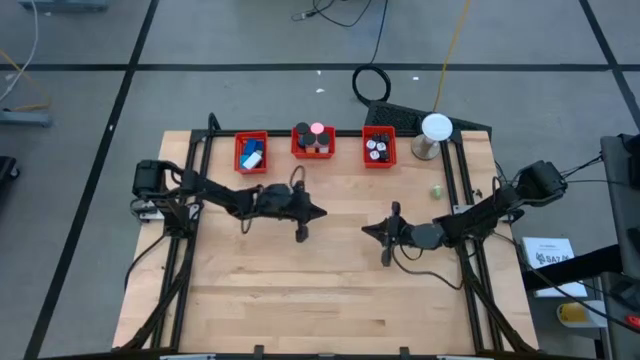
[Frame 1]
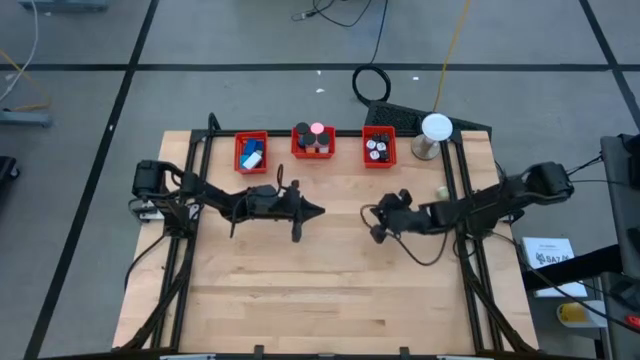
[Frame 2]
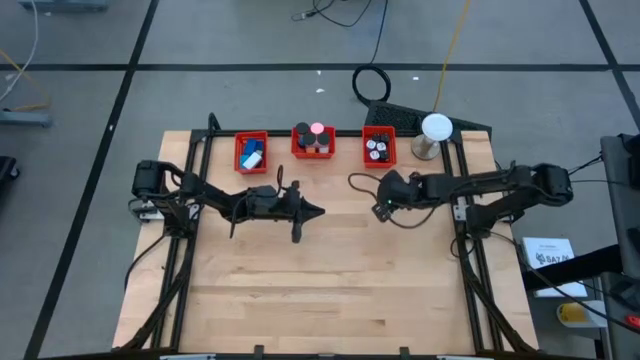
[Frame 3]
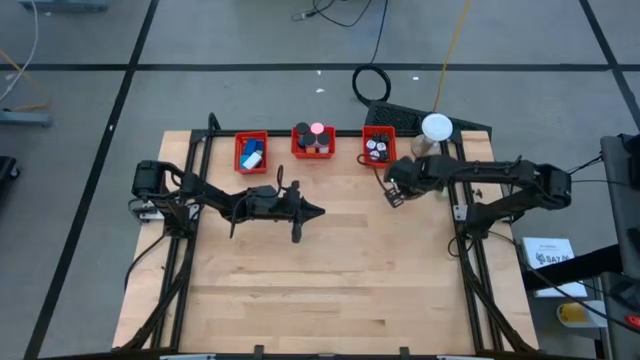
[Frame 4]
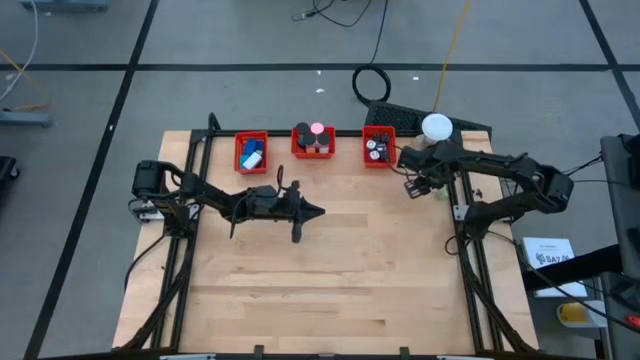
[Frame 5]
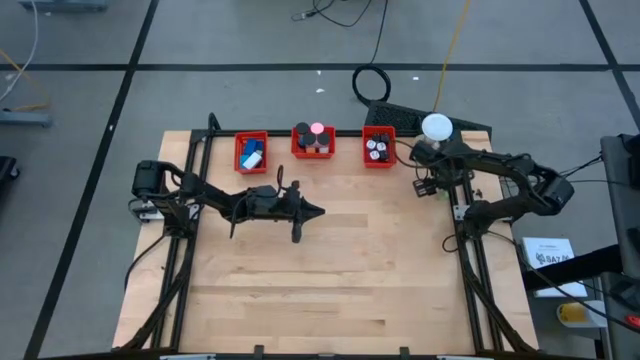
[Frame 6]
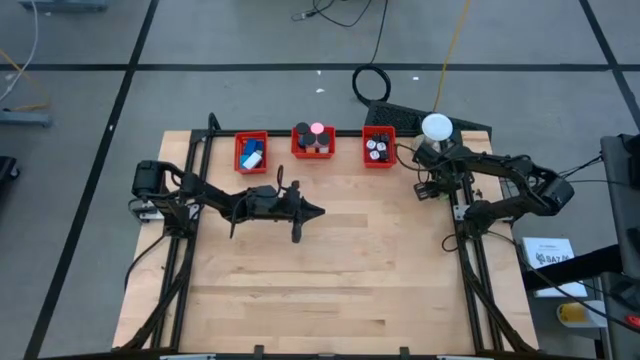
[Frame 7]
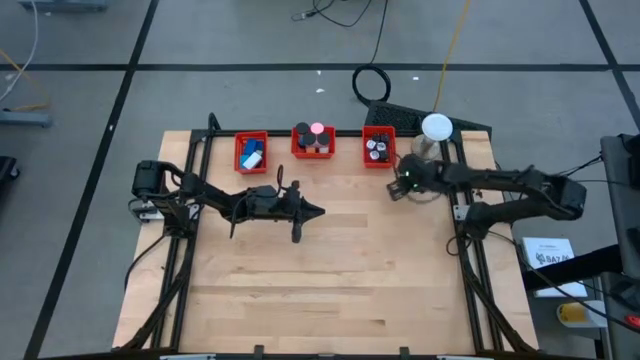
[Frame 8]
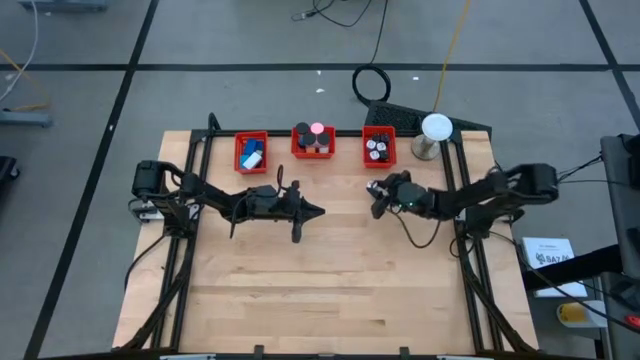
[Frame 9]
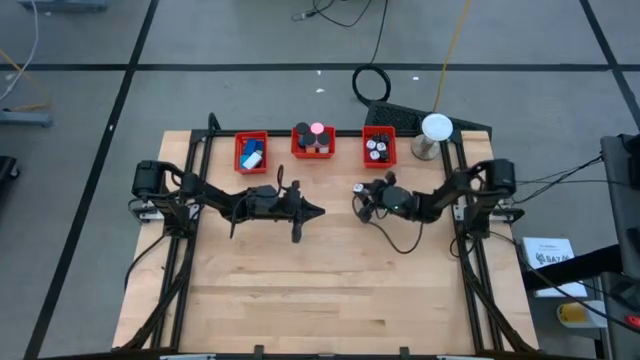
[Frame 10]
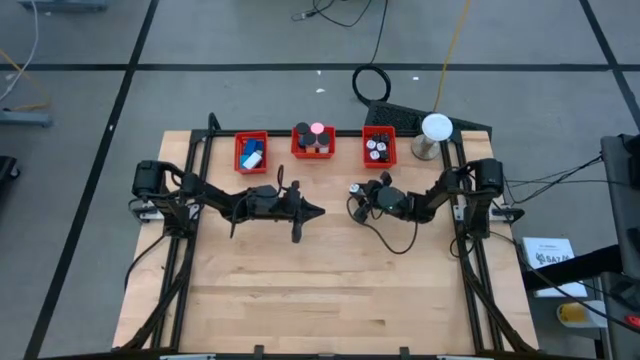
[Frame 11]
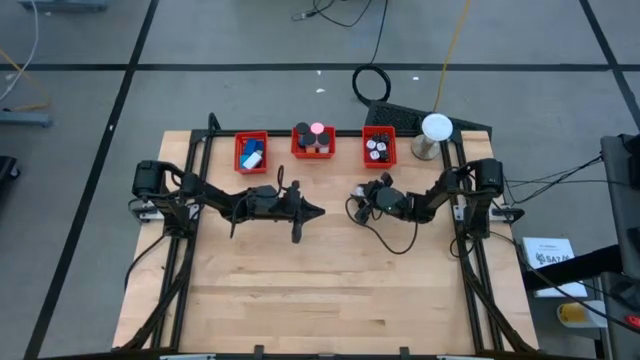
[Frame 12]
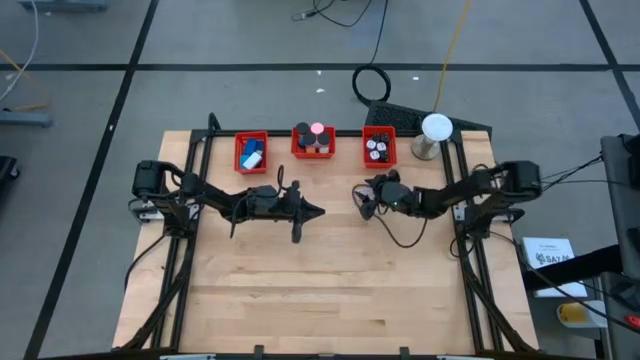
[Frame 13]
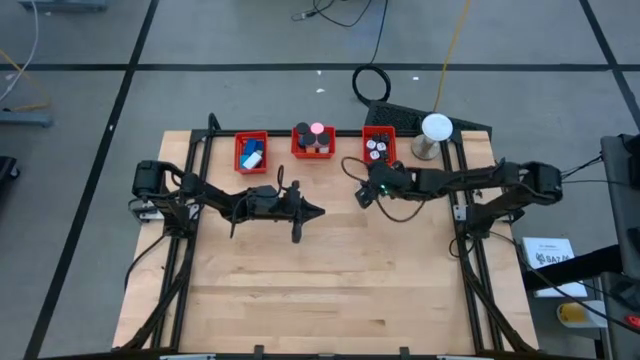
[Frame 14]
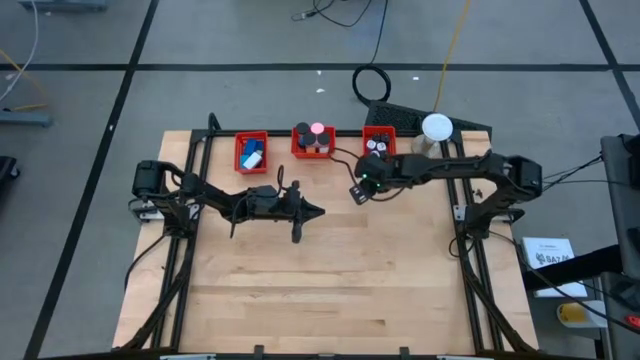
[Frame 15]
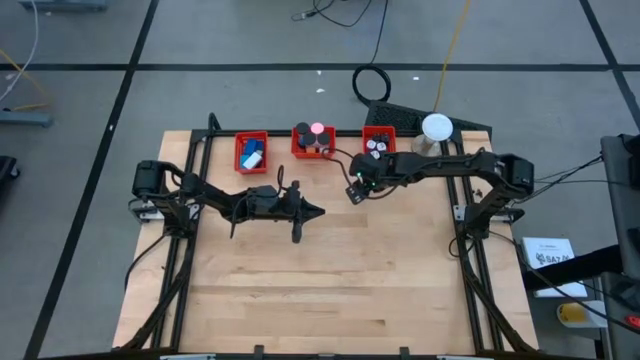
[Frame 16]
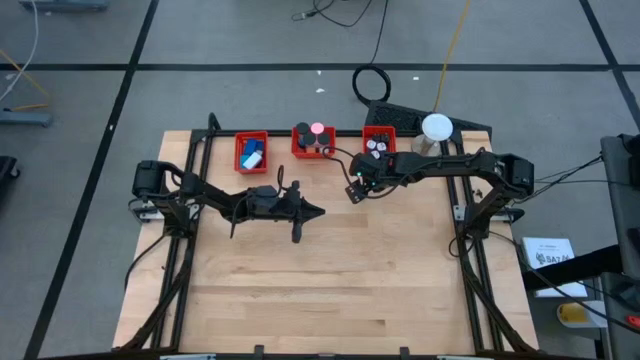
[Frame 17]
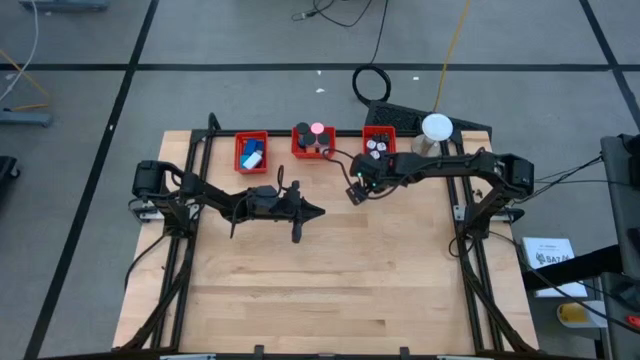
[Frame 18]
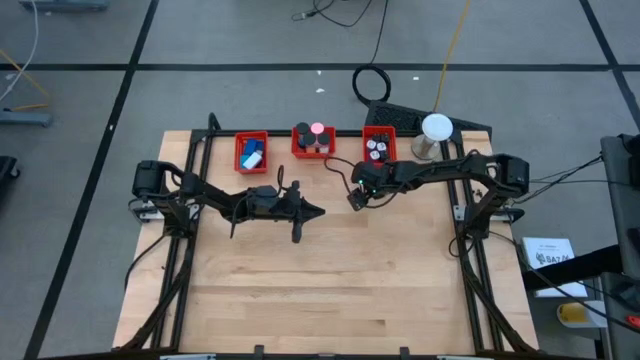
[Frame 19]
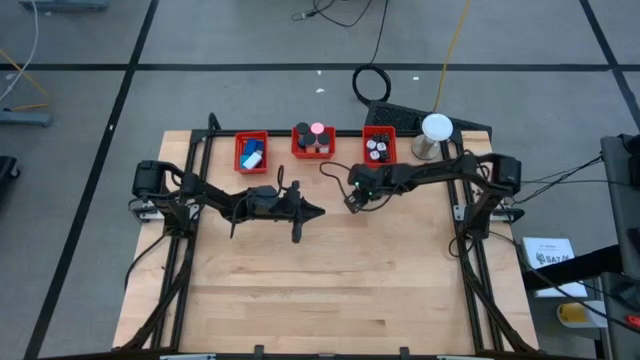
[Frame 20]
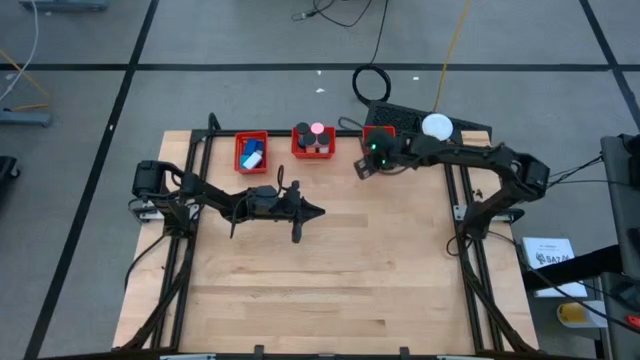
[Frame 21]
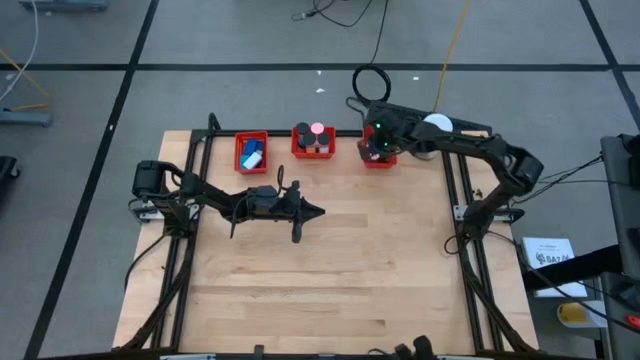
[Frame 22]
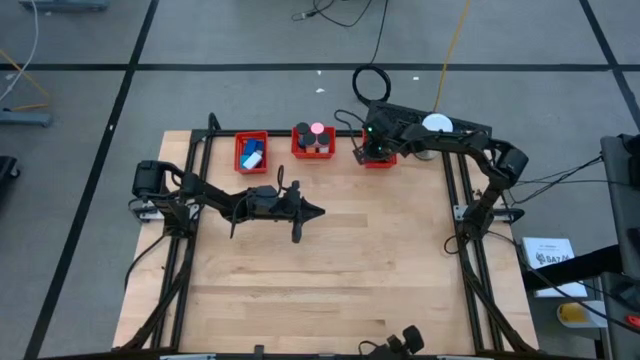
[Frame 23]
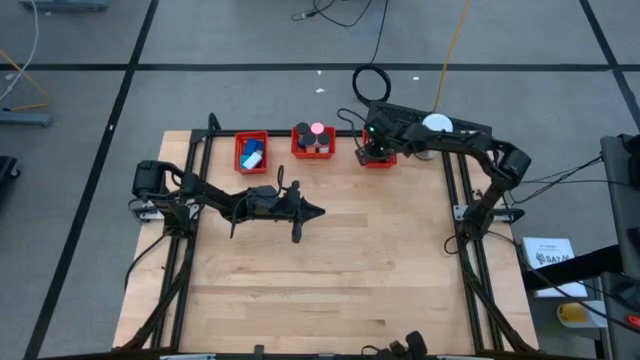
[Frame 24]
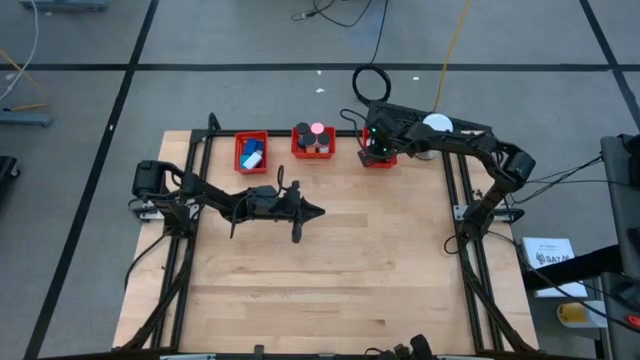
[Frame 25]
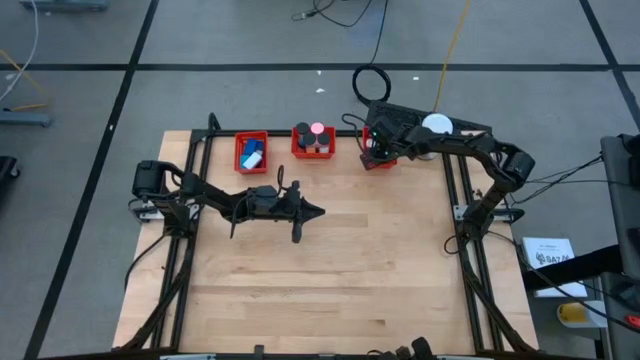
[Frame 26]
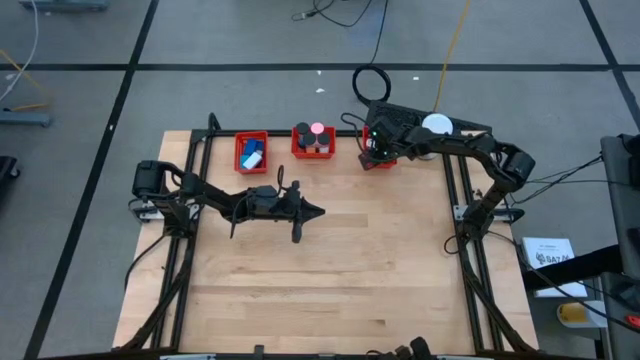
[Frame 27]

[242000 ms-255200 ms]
Task: Pick & Place Office items
Put the green charger adapter into the right orange basket

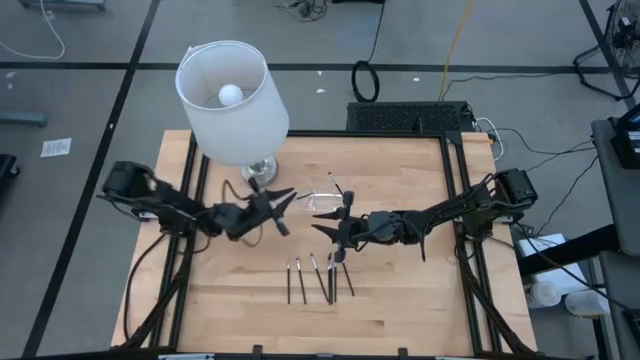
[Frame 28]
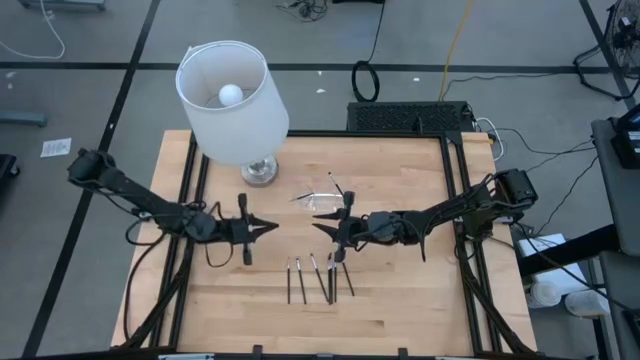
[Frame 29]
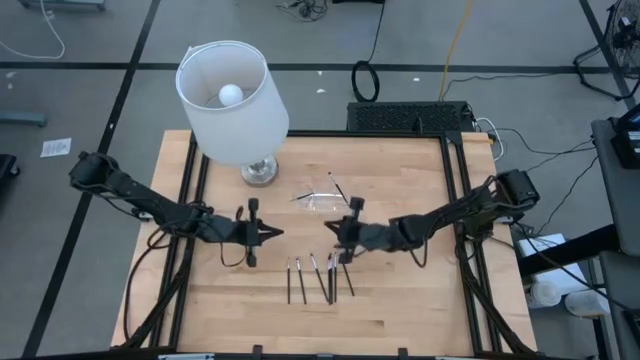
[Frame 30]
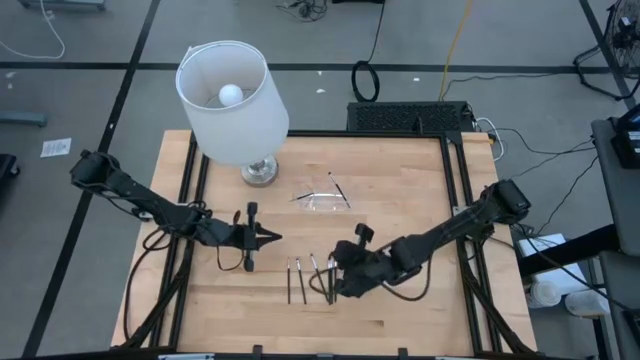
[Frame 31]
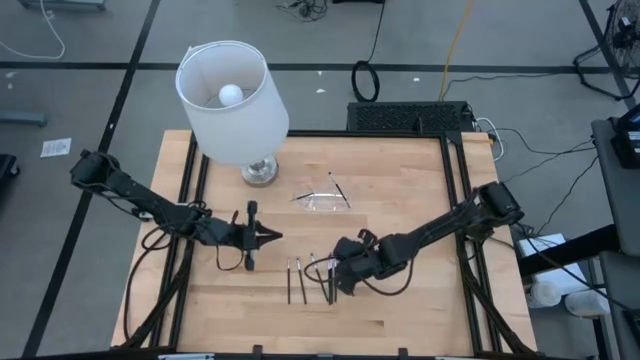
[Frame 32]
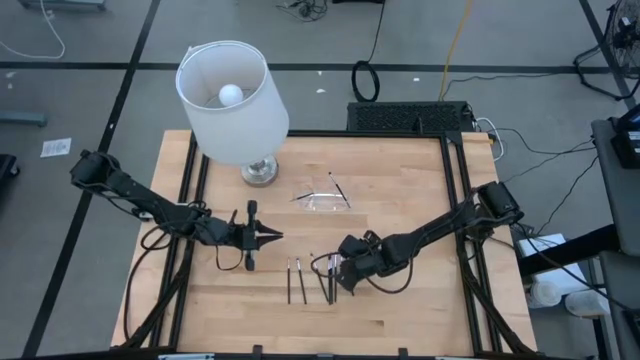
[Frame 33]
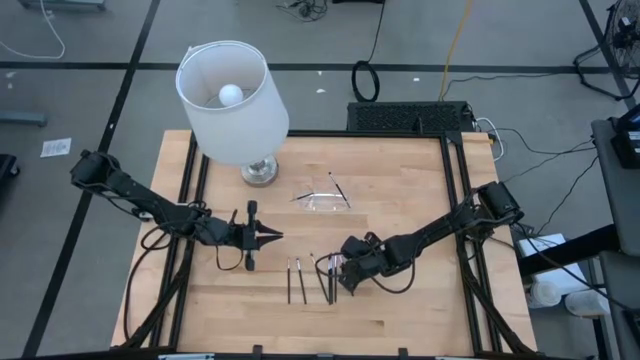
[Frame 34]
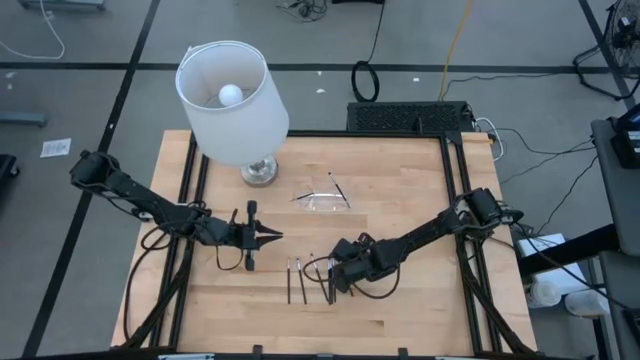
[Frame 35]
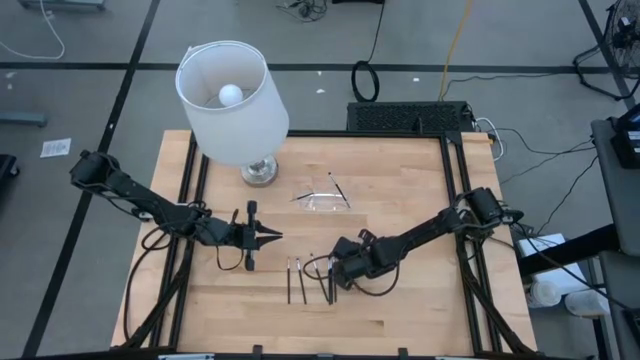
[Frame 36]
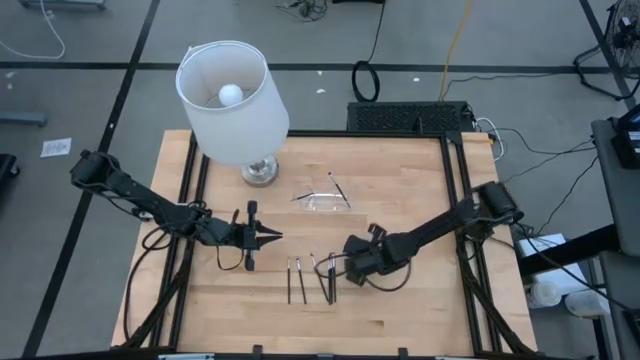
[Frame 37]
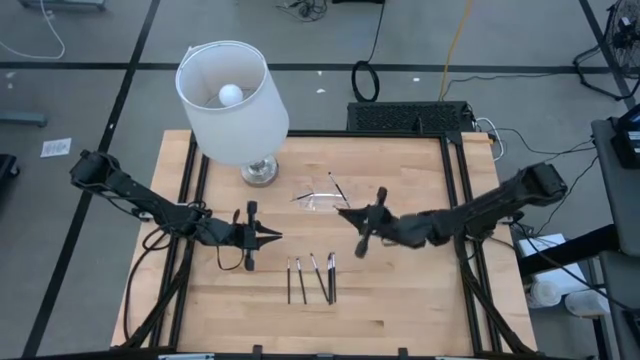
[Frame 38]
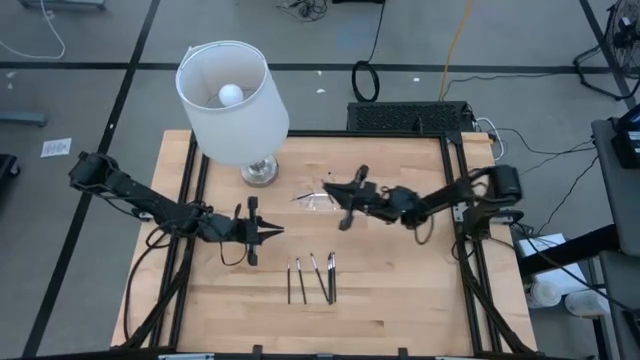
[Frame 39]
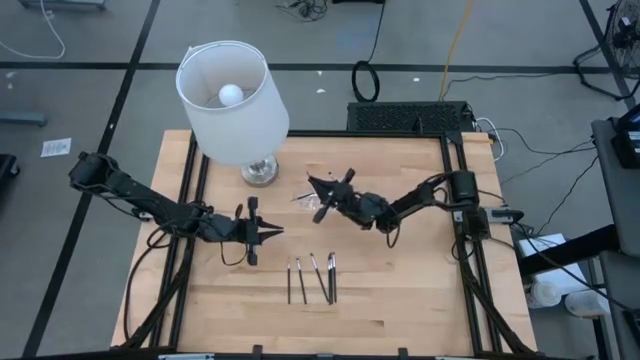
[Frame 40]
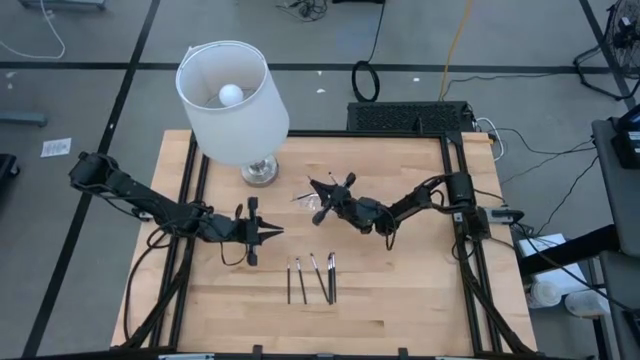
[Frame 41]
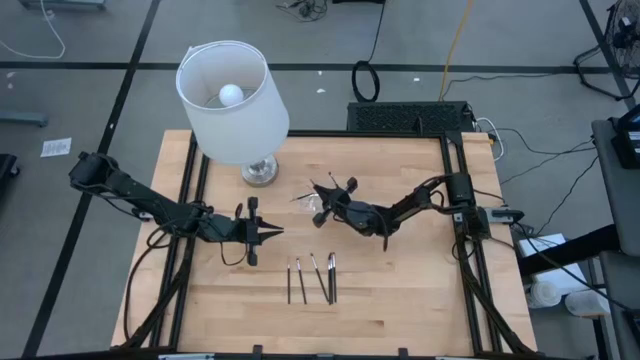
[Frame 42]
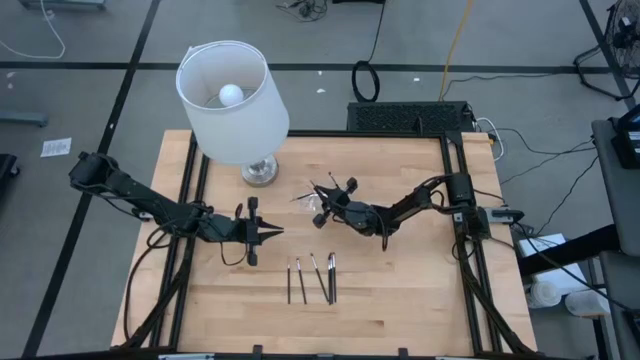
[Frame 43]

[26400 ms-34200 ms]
Task: Put items in baskets/containers
Put the black eyeshadow brush into the transparent organizer
